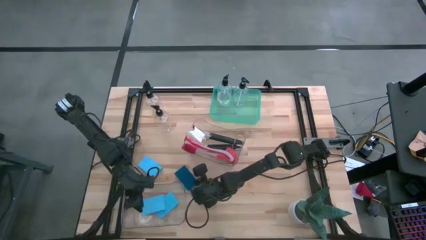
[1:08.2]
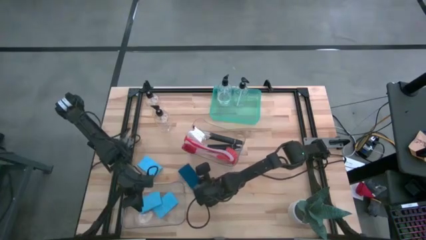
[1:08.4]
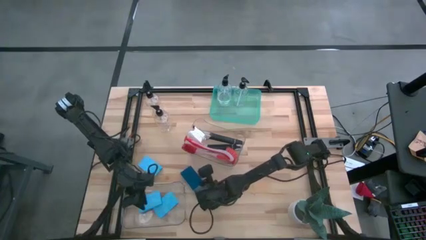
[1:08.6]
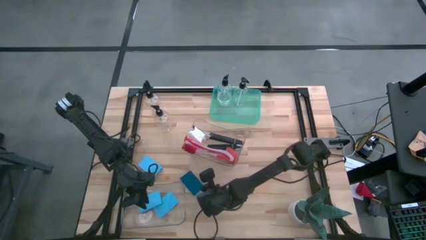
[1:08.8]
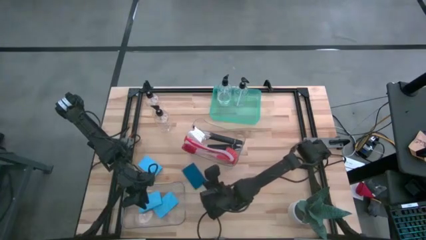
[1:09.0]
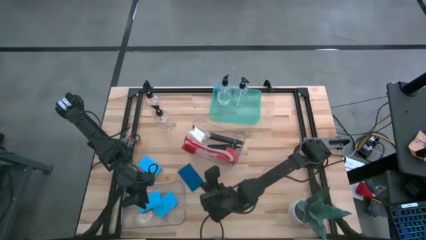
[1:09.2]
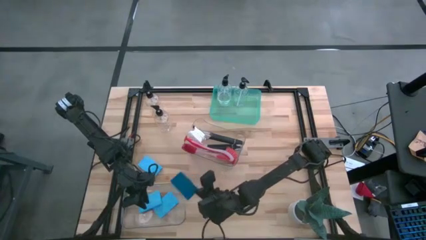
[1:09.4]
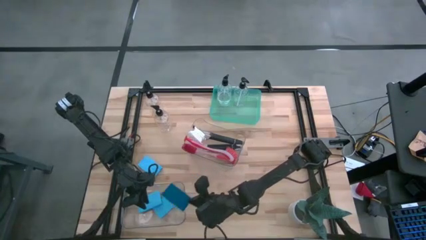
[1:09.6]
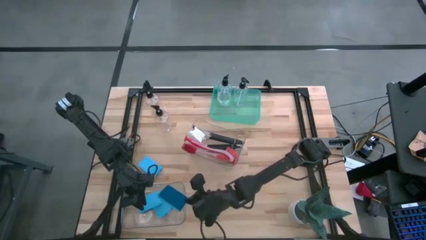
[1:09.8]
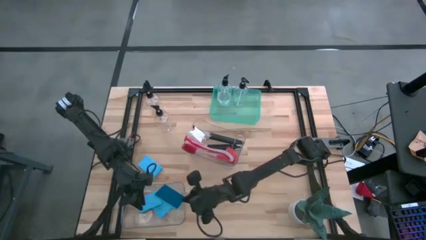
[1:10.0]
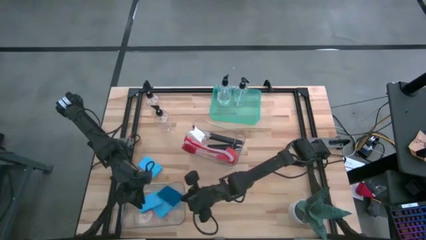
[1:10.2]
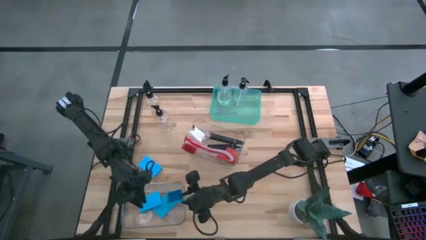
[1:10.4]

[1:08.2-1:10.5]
Task: Pick & Place Kitchen Sink Supplies
Put the blue sponge into the bottom transparent bin

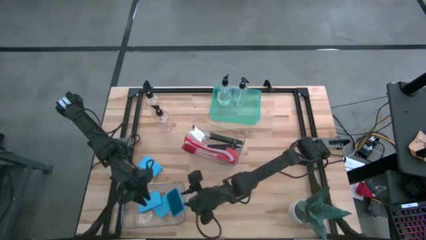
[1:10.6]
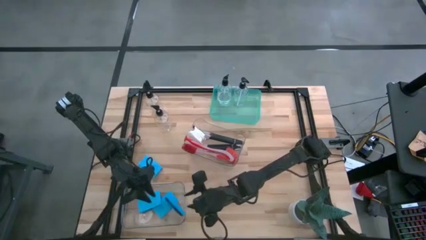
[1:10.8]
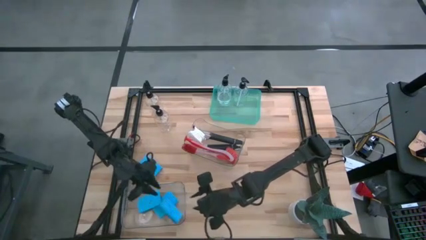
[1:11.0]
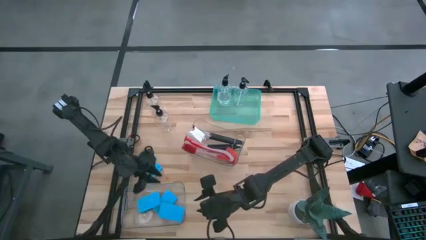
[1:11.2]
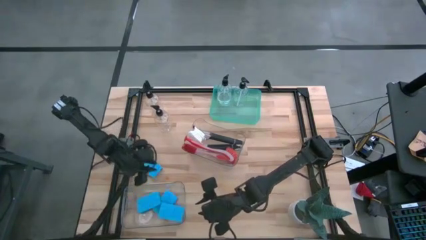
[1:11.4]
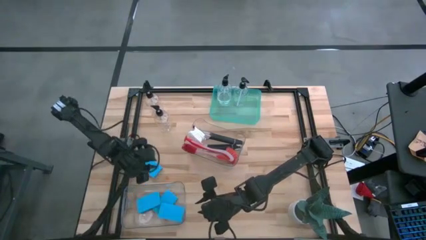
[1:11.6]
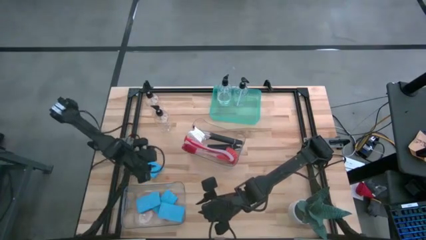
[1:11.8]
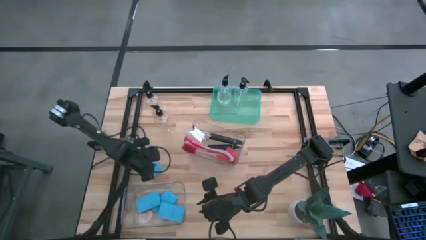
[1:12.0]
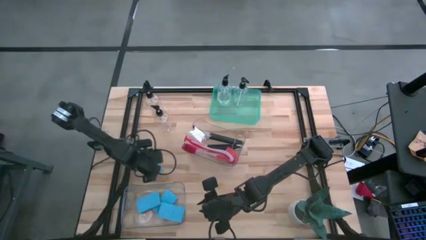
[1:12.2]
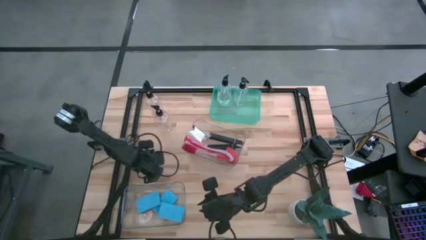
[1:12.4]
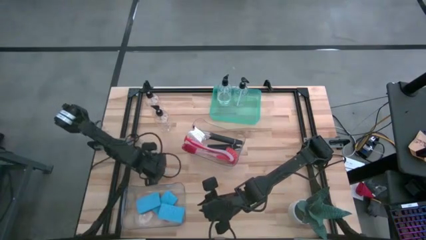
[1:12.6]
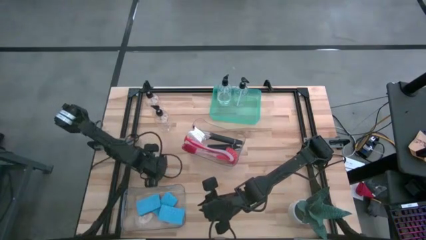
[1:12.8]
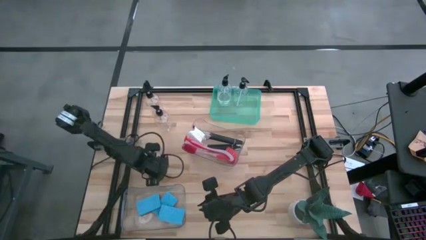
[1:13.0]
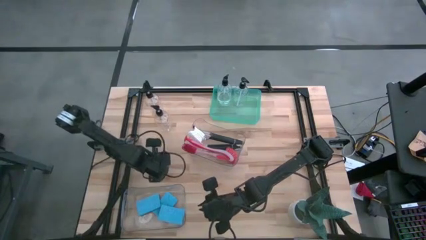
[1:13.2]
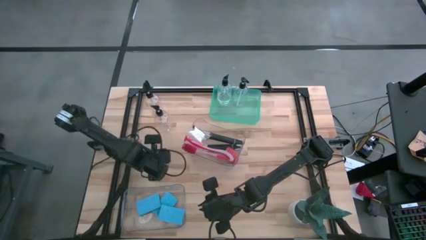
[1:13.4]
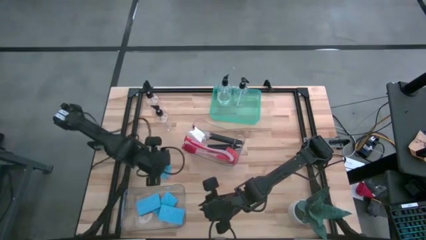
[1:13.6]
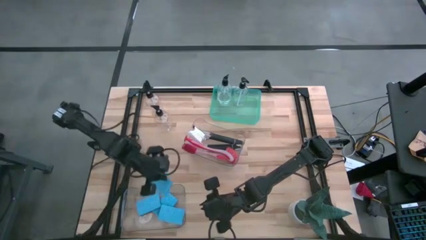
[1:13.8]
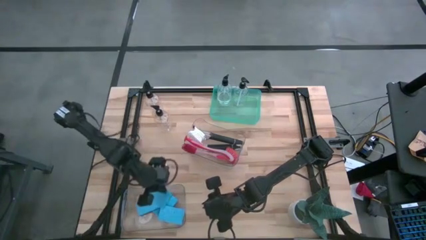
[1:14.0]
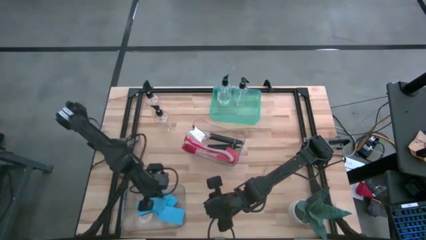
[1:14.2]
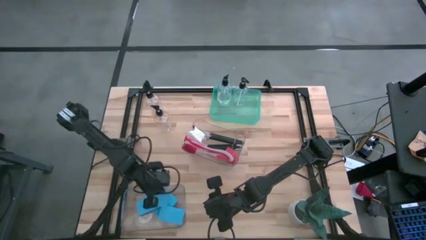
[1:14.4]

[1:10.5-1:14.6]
Put the blue sponge into the bottom transparent bin

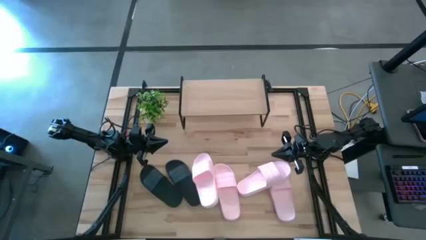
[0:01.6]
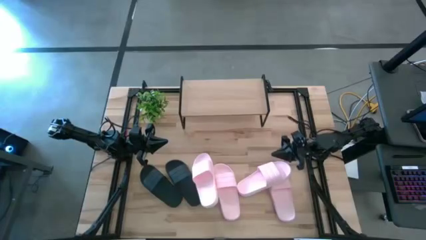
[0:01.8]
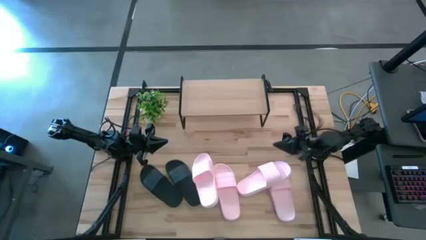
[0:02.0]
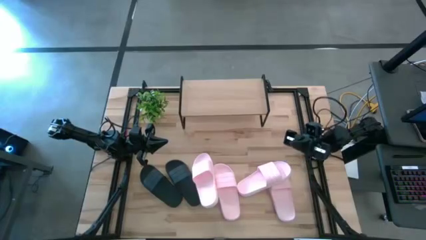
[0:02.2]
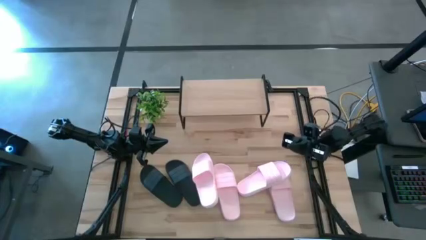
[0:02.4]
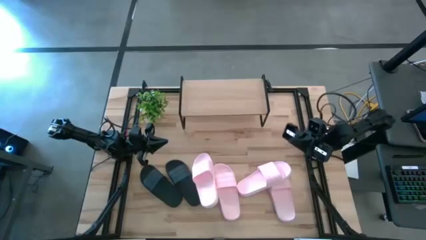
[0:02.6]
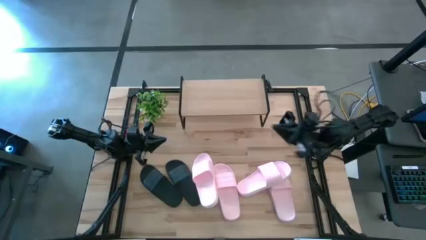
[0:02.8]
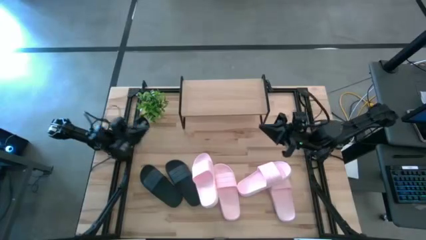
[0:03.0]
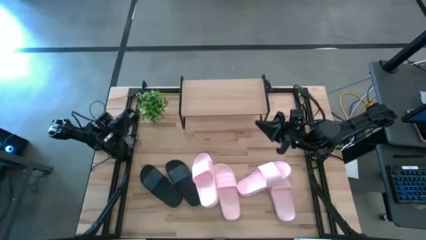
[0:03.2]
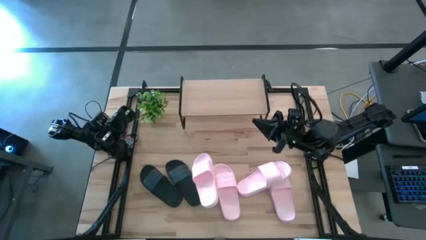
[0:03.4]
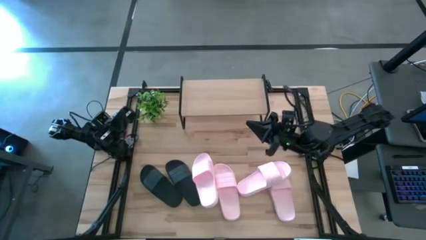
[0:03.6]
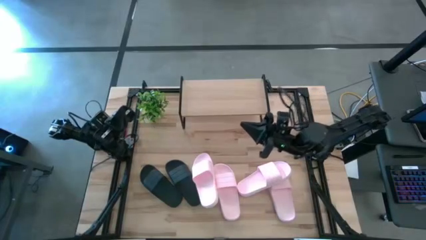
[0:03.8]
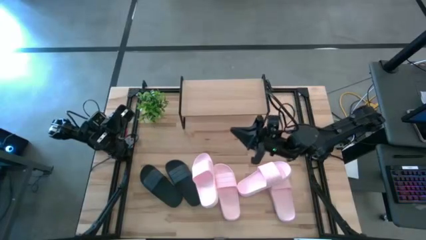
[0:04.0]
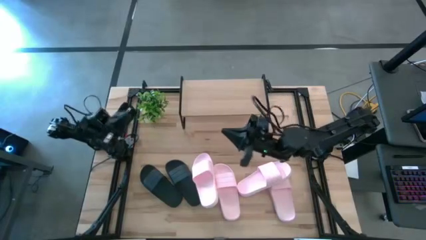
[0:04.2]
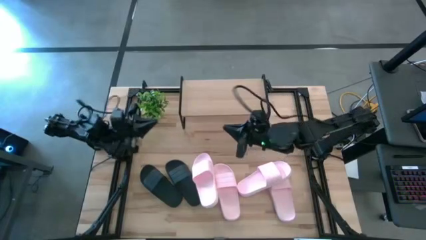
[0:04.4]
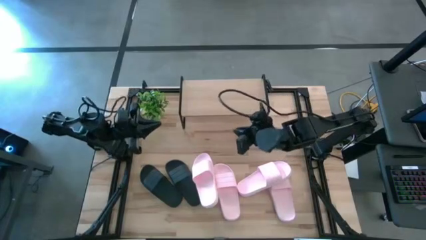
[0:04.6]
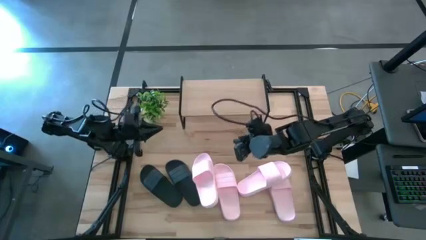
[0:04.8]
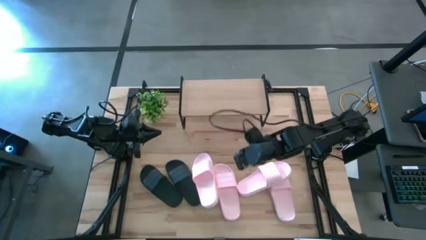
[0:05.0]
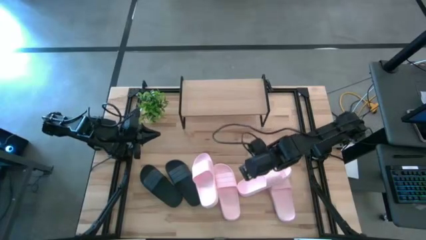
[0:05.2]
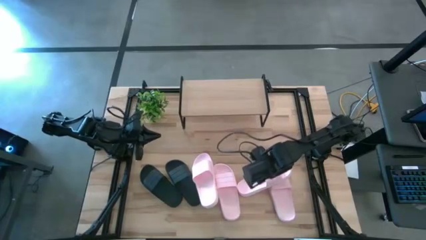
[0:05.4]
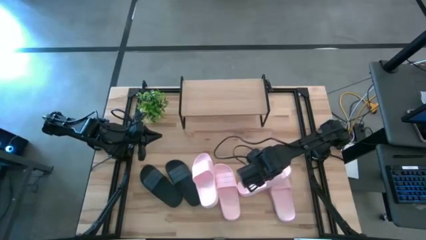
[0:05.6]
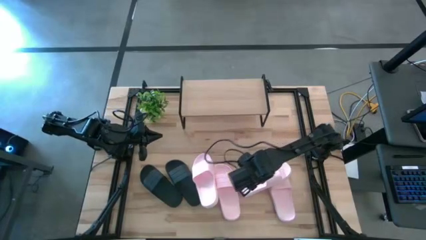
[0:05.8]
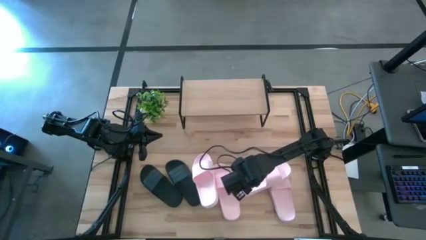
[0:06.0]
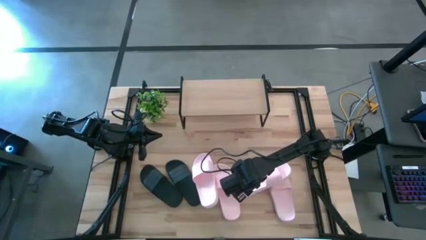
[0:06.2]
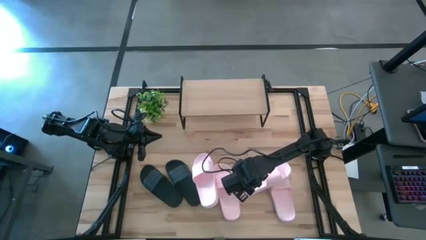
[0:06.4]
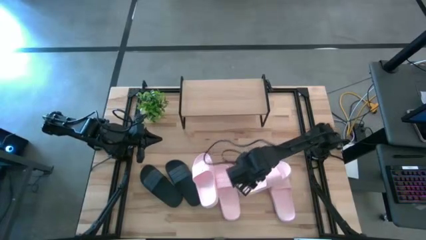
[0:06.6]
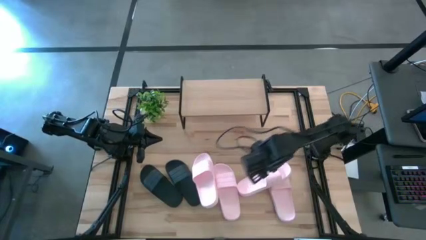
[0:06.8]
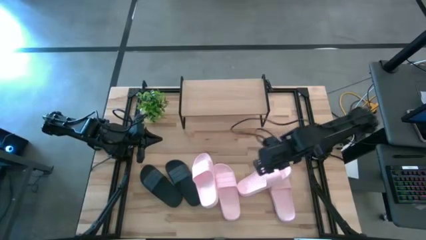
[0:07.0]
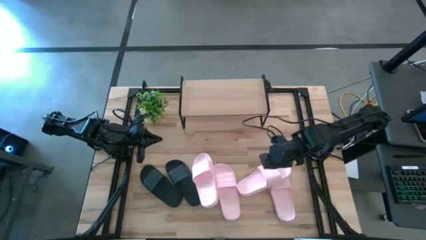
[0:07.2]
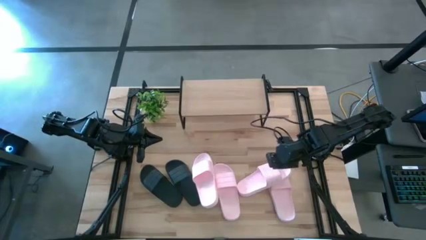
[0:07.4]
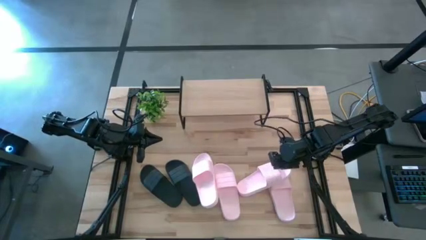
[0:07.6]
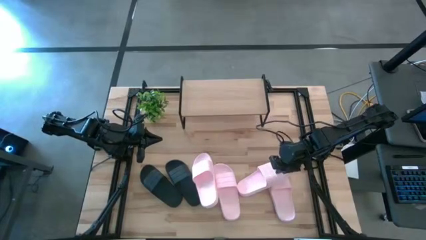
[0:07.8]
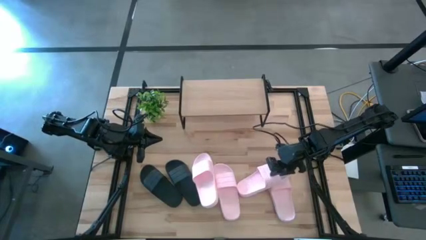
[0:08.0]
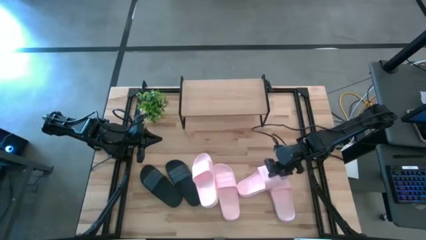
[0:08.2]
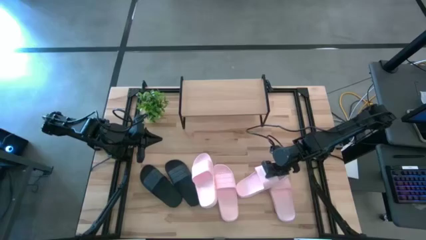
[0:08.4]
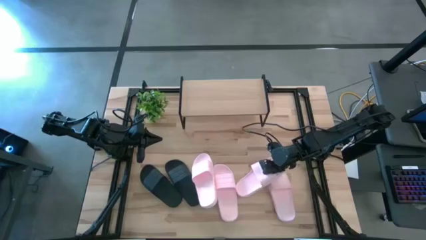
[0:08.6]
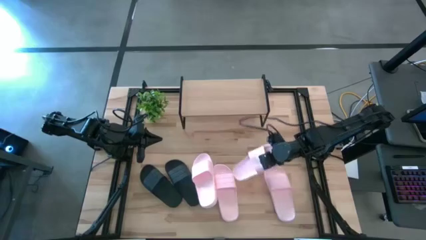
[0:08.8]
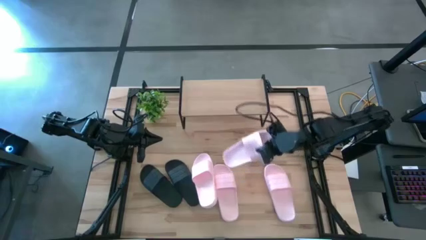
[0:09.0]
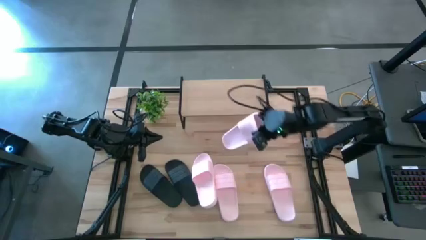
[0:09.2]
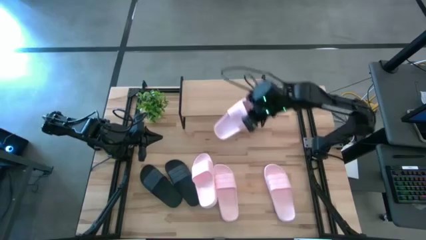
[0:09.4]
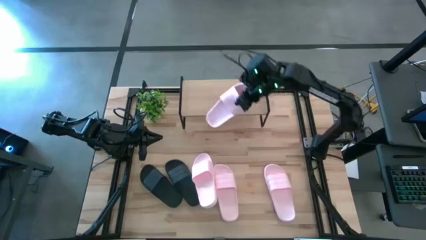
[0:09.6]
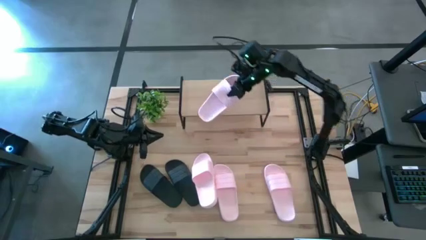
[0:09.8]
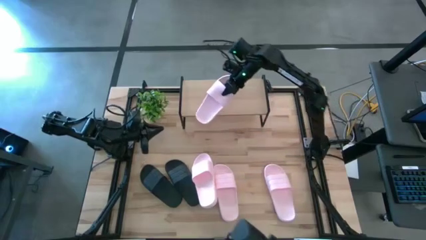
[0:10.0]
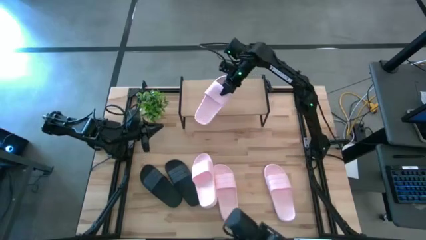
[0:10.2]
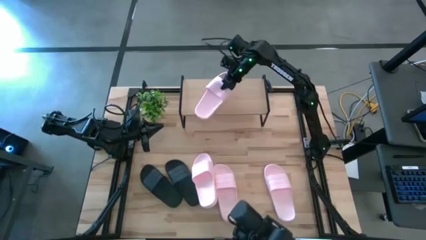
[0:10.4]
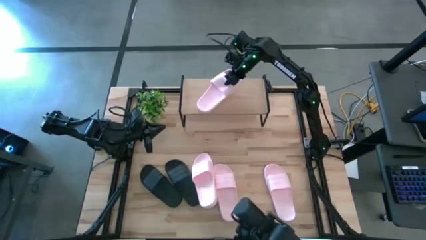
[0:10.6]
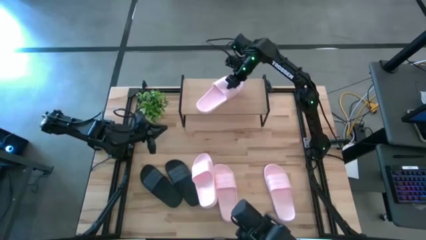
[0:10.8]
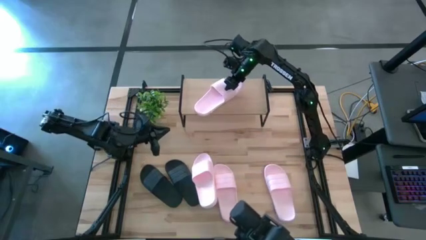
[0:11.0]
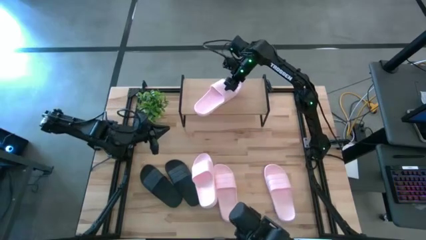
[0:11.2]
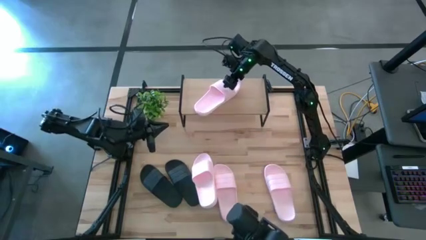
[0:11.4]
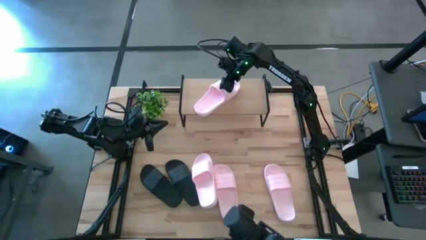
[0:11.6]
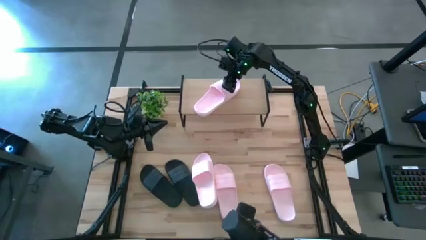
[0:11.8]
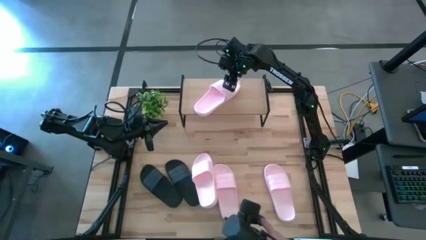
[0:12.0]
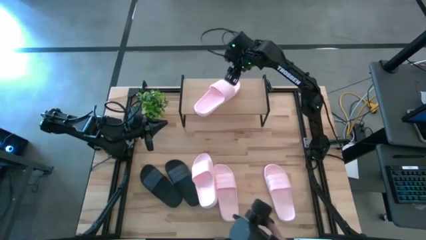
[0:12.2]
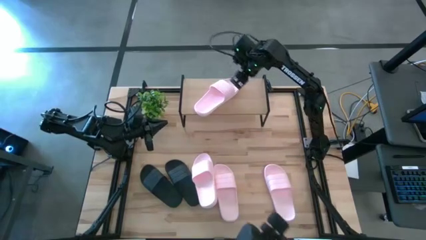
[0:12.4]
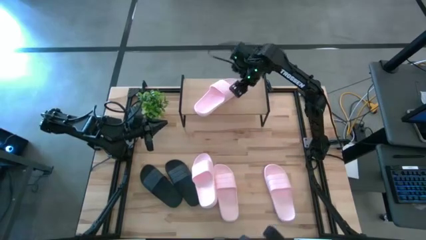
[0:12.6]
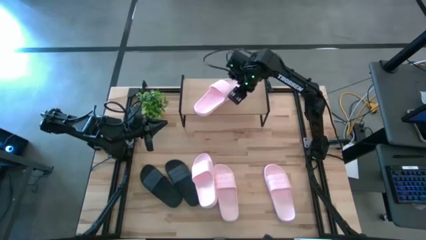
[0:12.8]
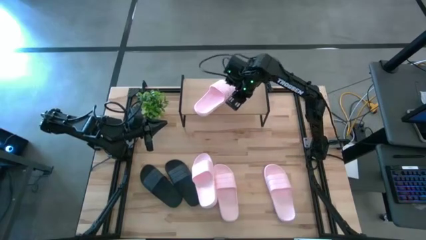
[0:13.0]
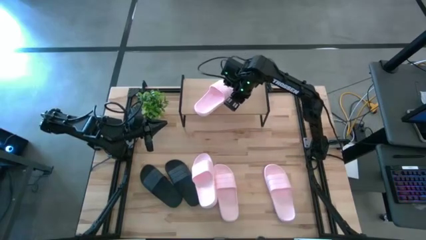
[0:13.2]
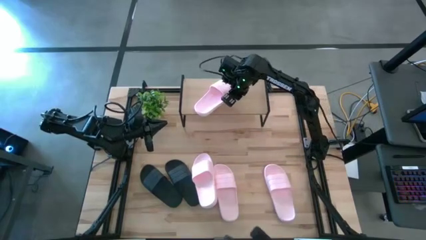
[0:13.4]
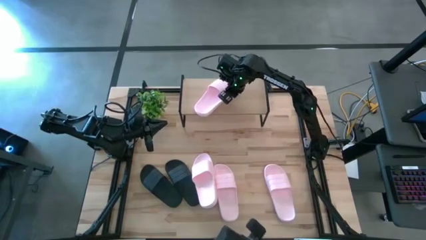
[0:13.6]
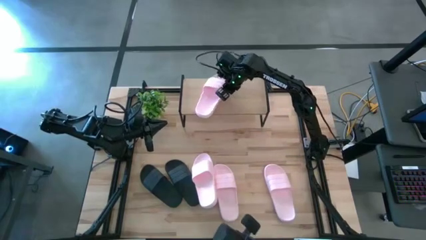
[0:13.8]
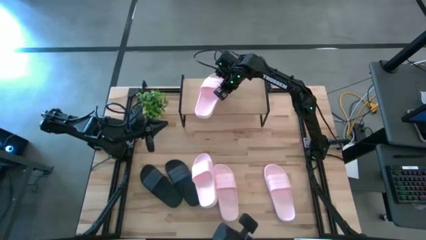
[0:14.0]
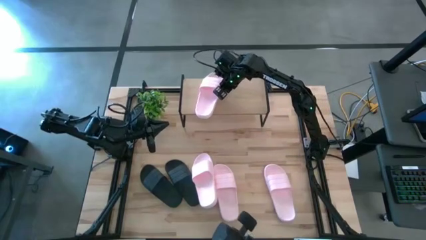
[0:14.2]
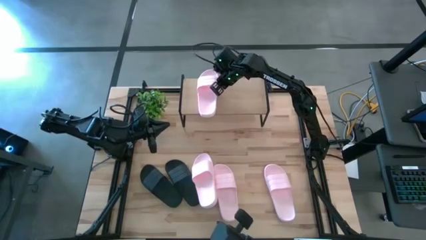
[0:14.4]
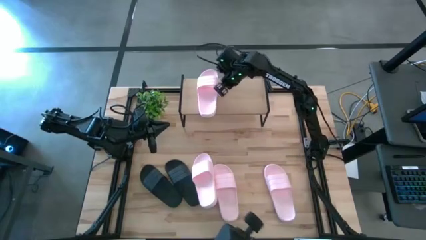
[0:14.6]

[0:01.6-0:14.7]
Task: Pick and place slides into the shelf
Put the top right pink slide on the shelf
